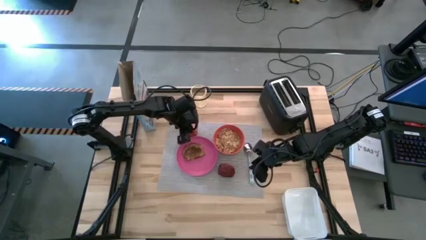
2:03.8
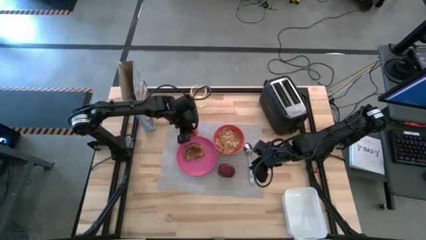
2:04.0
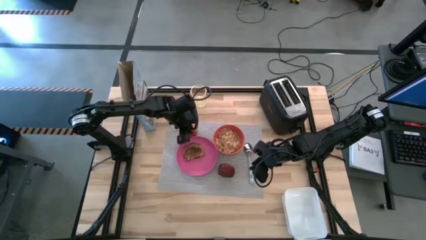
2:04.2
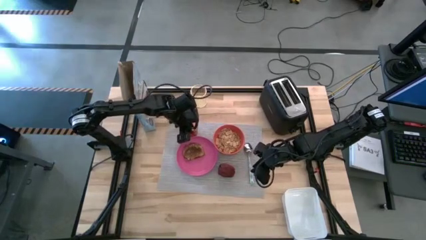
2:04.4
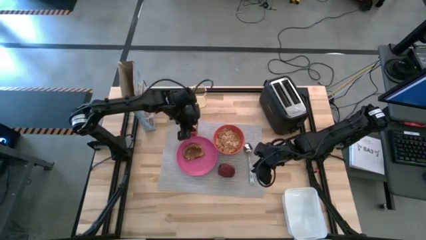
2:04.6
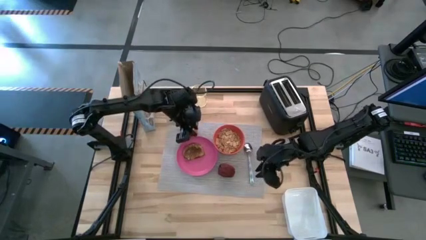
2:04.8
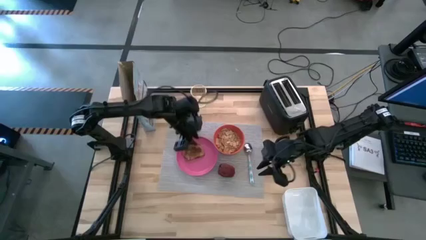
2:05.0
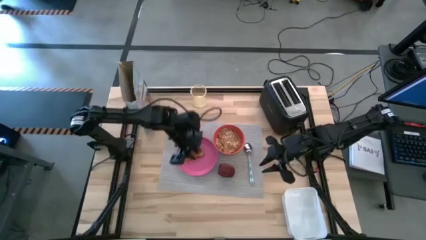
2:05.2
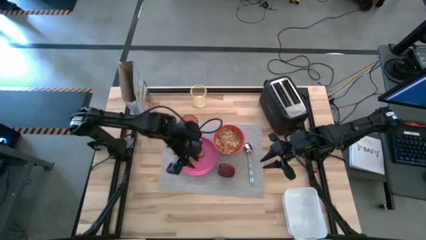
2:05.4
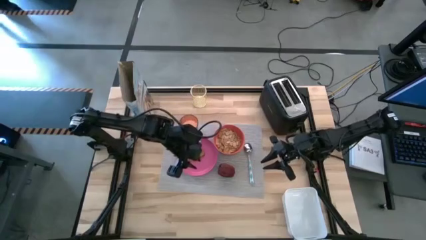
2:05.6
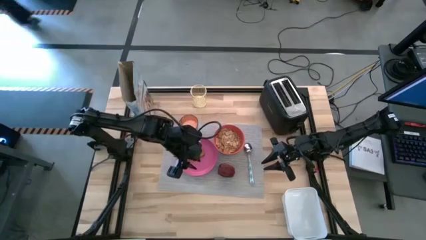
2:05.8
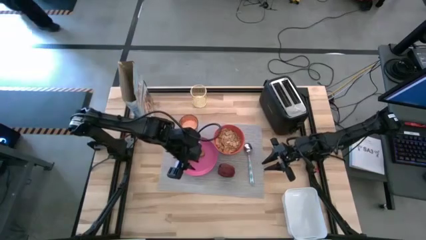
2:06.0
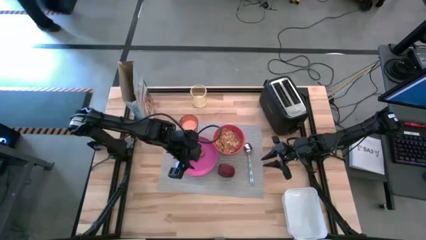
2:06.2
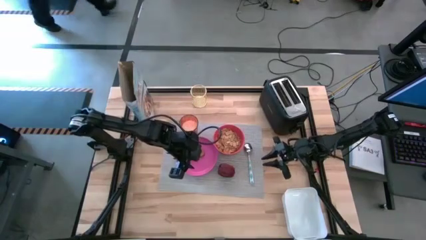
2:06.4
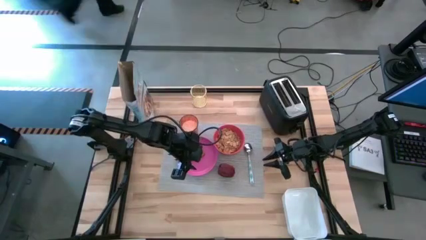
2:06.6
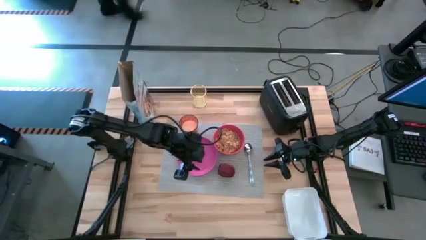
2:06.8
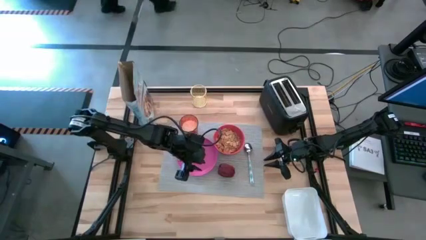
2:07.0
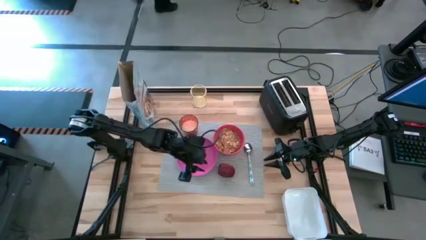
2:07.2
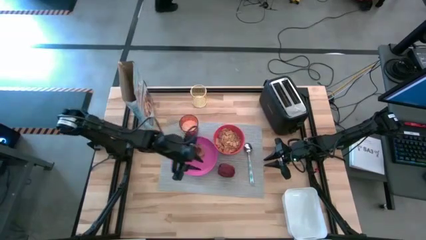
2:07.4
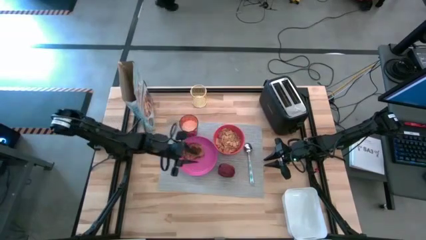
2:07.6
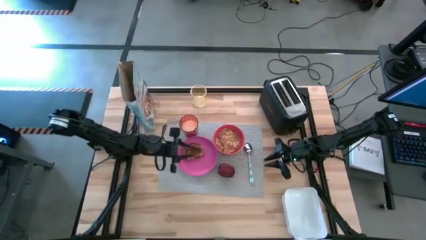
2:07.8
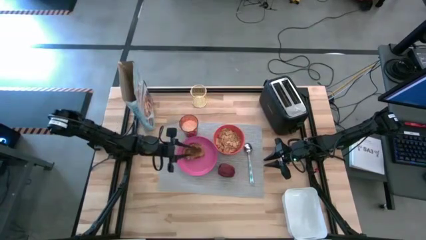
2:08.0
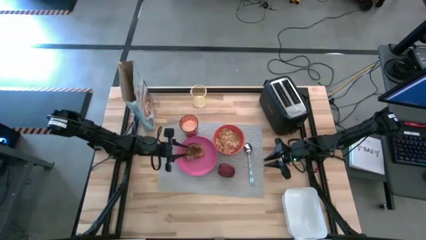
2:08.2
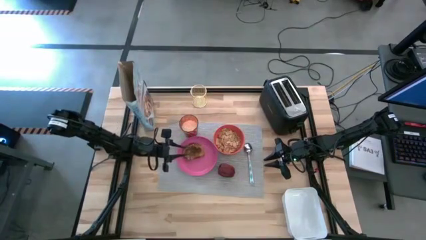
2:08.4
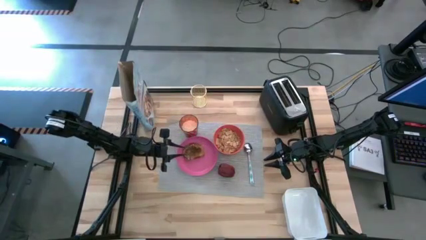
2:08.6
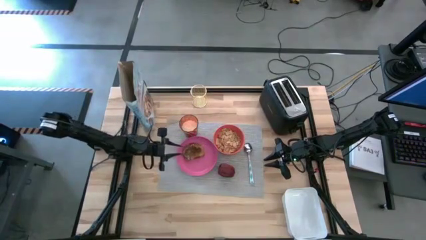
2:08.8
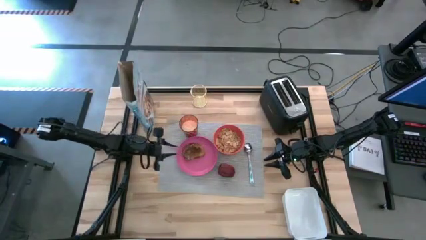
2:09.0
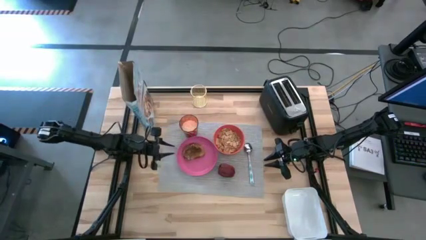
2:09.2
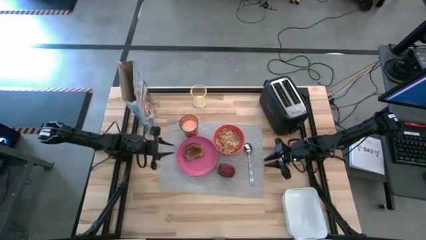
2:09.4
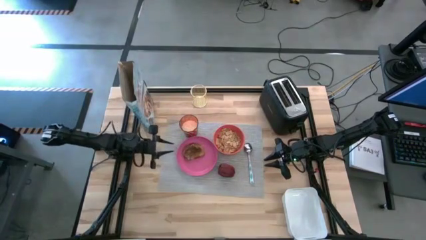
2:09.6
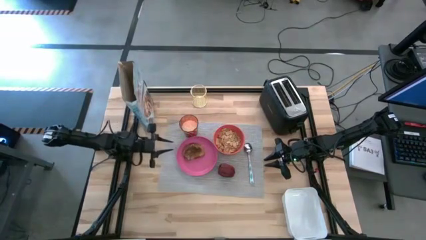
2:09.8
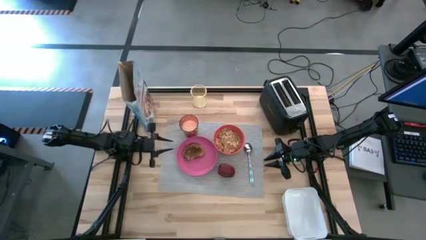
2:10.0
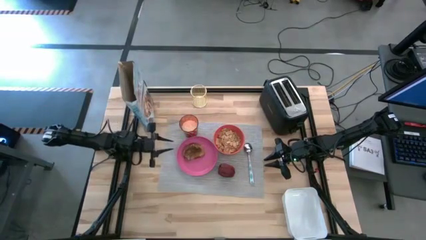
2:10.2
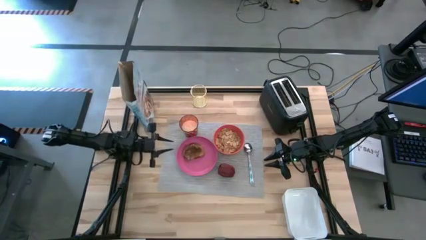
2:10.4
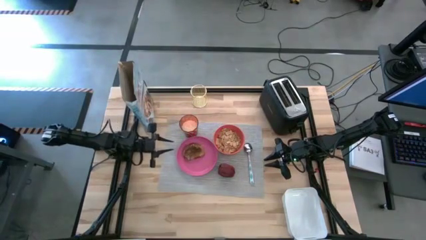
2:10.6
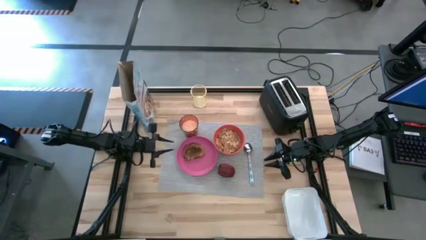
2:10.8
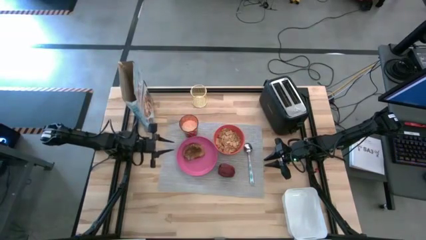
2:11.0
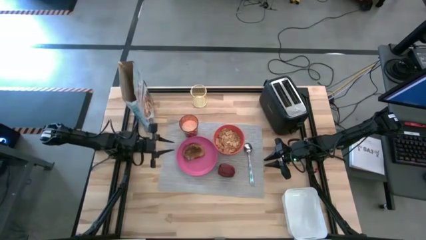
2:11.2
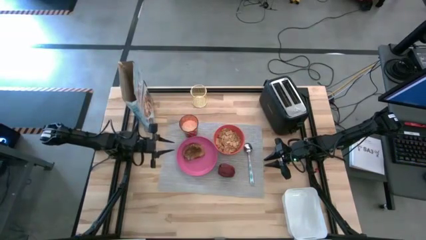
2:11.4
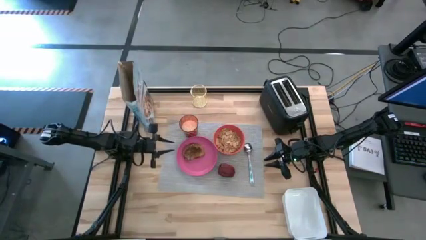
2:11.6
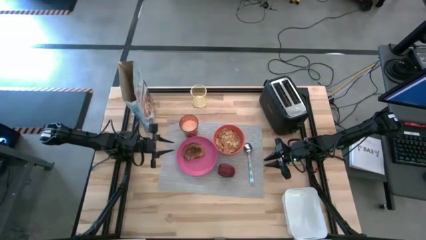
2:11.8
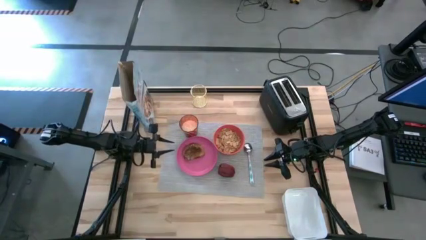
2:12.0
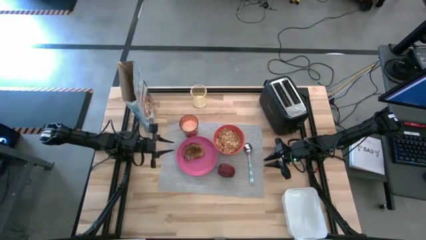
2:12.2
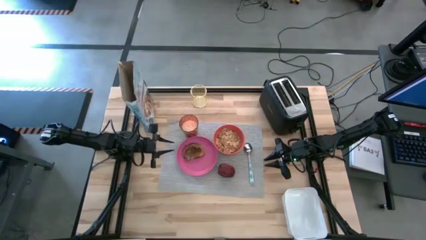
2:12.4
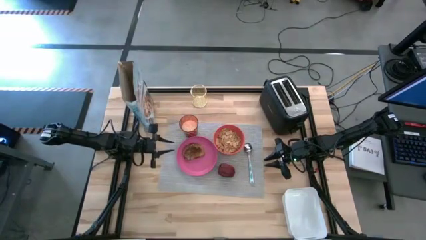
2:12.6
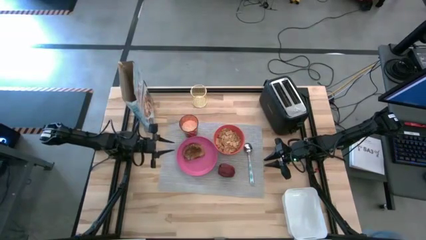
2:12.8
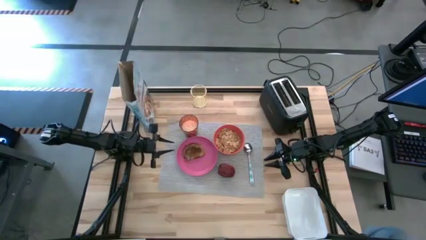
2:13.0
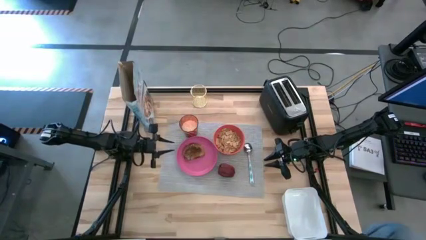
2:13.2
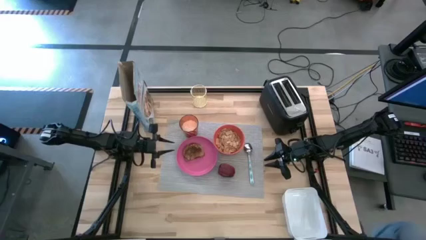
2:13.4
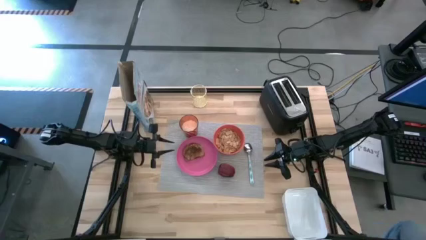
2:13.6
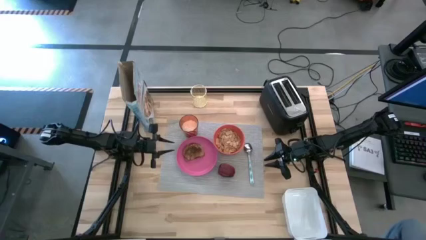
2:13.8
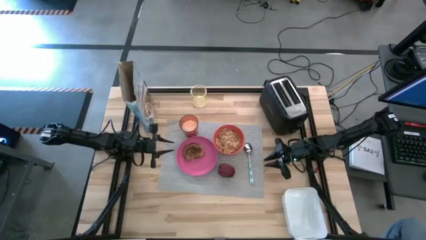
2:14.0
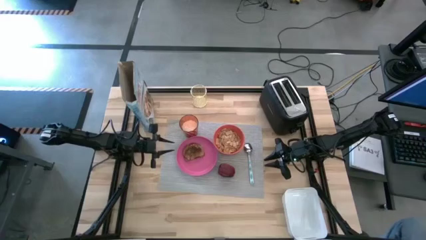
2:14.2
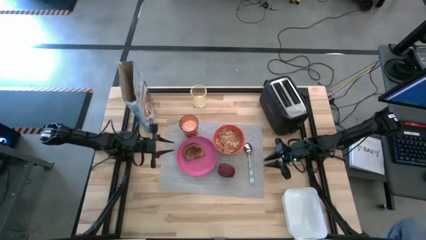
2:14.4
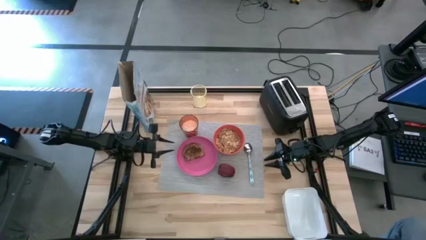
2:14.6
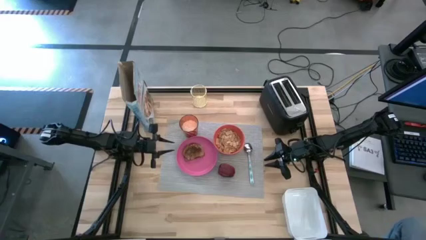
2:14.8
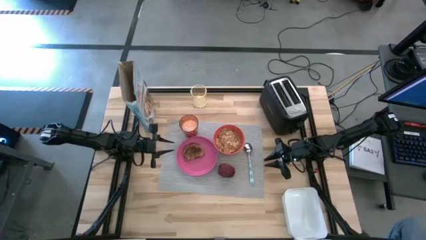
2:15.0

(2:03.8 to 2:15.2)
Task: Arrange a breakfast setting
Return to Home Position
